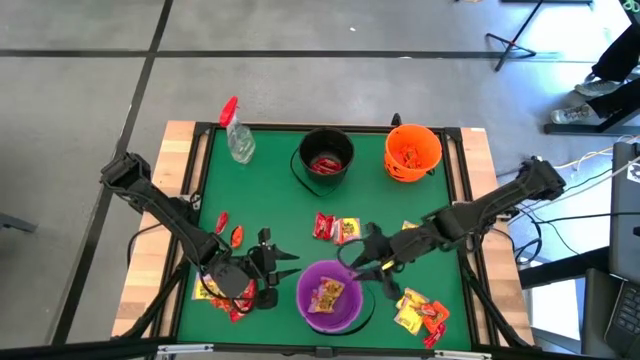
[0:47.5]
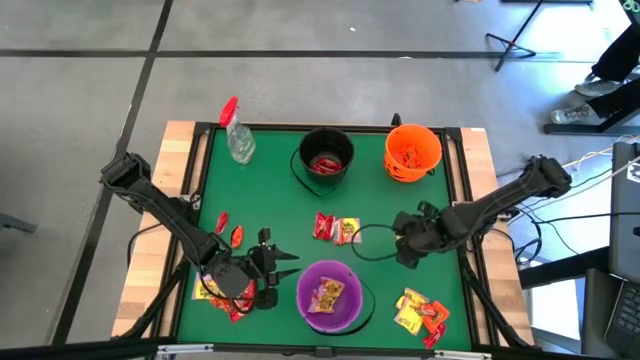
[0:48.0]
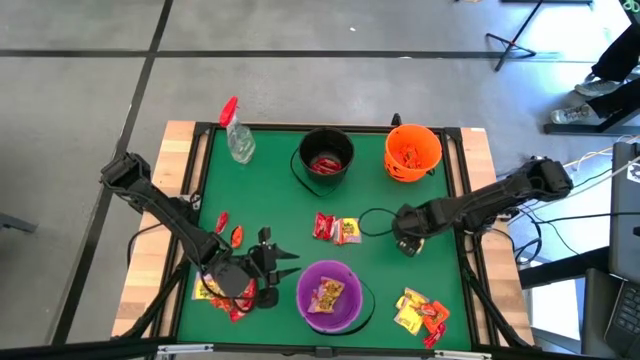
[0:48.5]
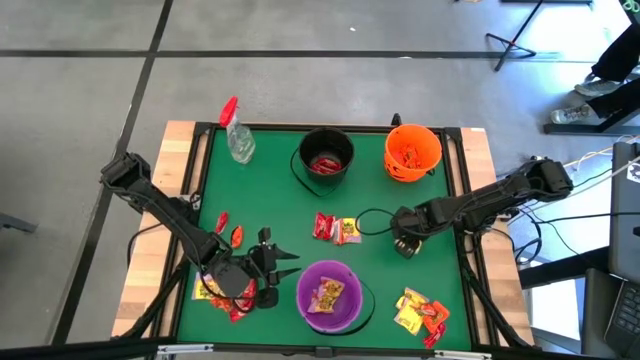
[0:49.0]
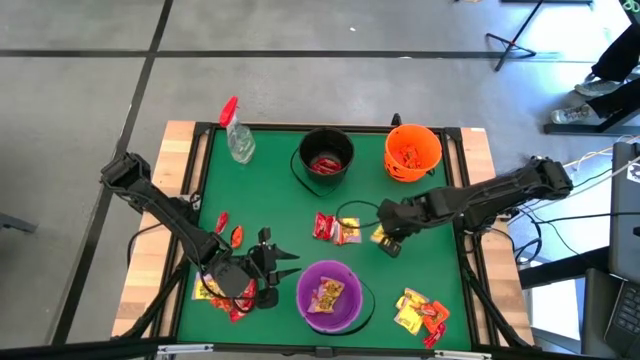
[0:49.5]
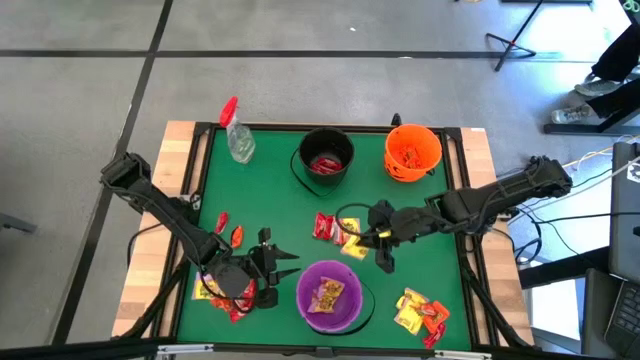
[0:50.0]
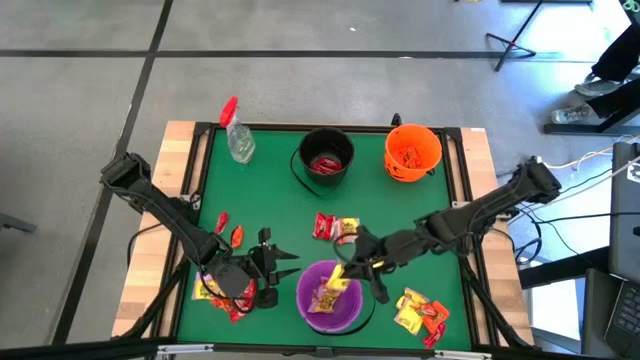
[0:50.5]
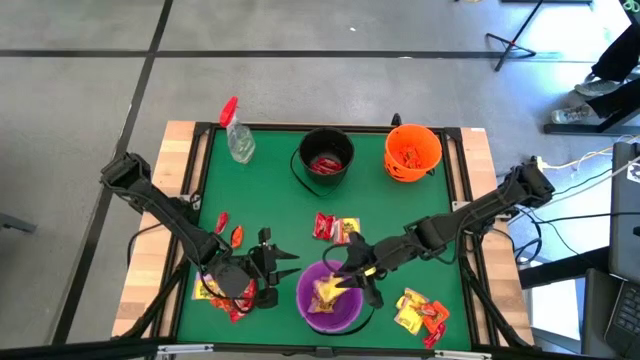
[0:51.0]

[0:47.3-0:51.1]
Task: Organize candy in baskets
Put the yellow candy pack into the purple bucket

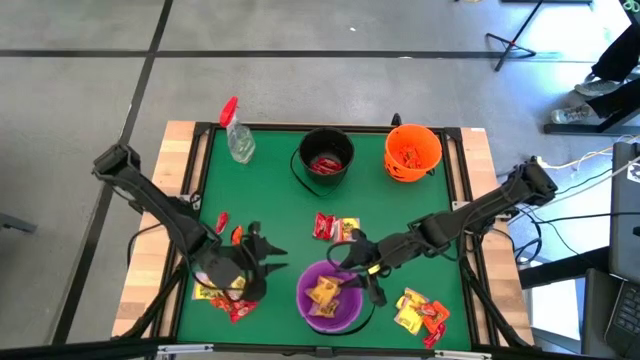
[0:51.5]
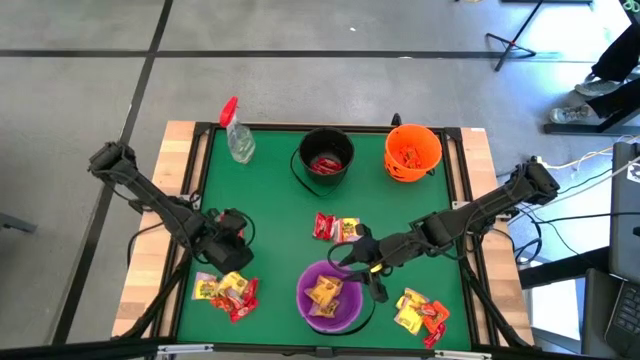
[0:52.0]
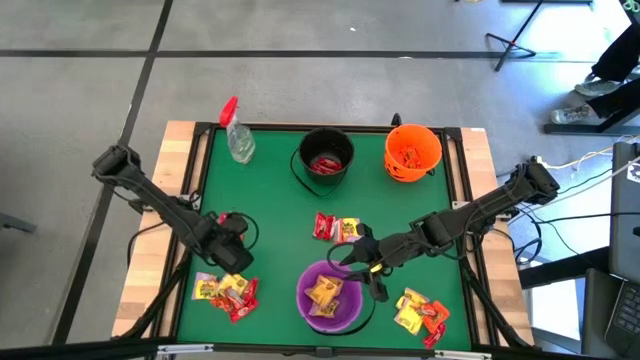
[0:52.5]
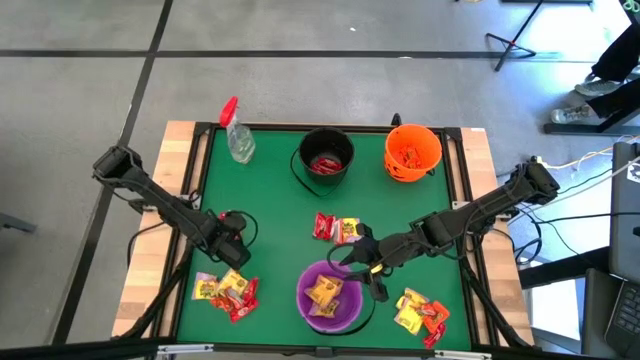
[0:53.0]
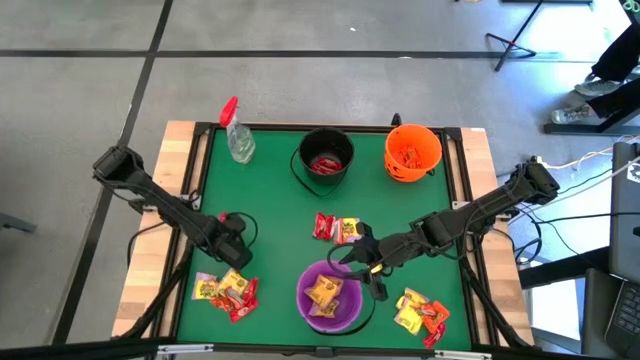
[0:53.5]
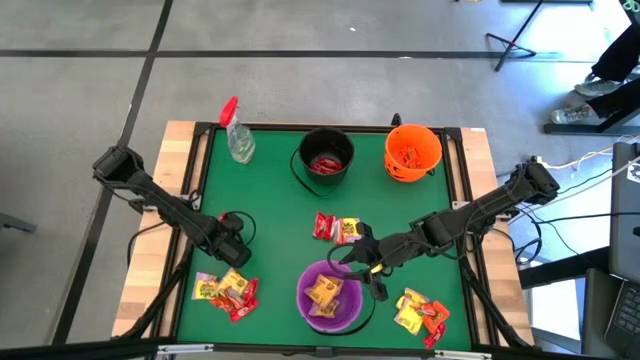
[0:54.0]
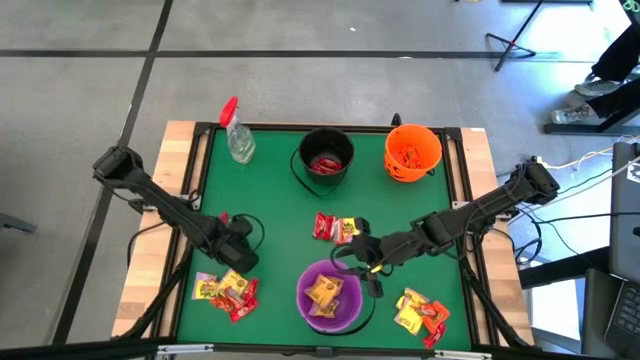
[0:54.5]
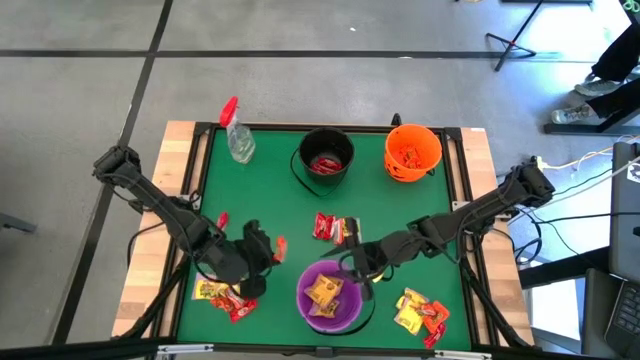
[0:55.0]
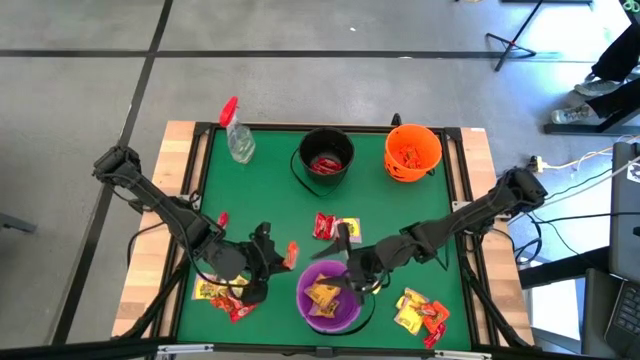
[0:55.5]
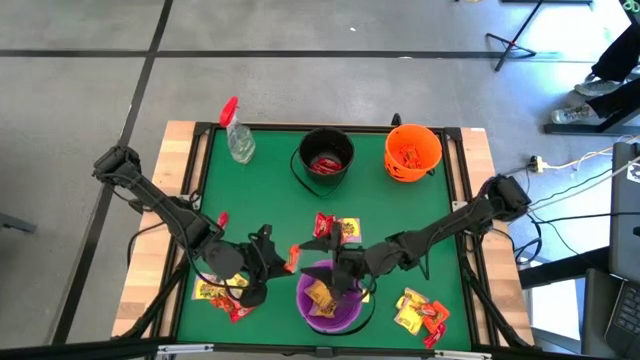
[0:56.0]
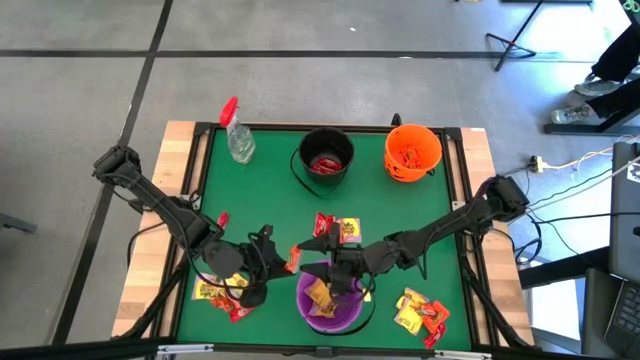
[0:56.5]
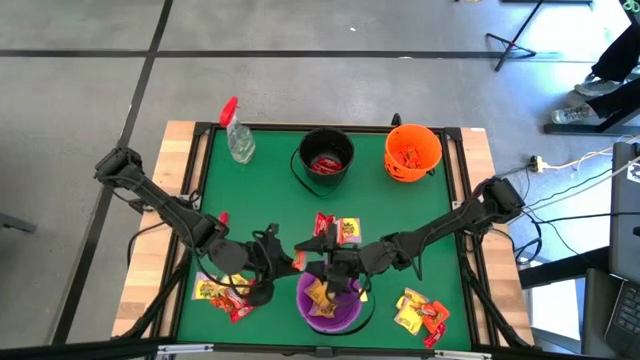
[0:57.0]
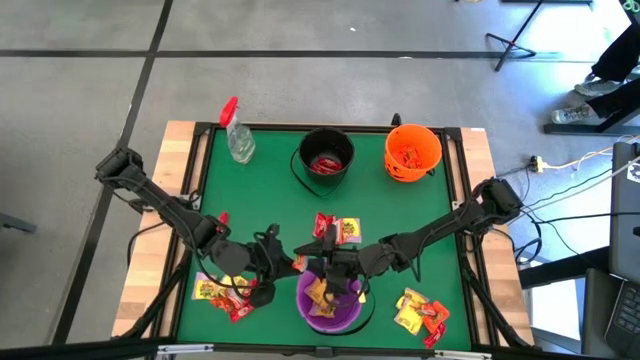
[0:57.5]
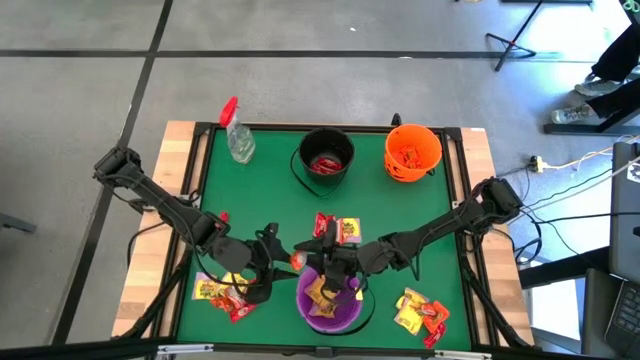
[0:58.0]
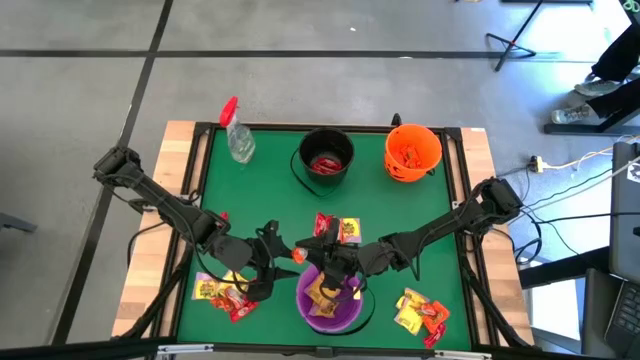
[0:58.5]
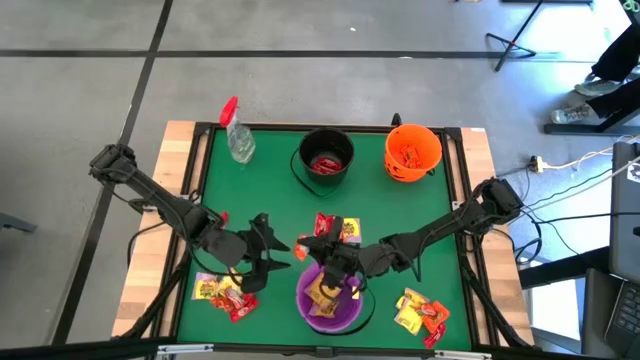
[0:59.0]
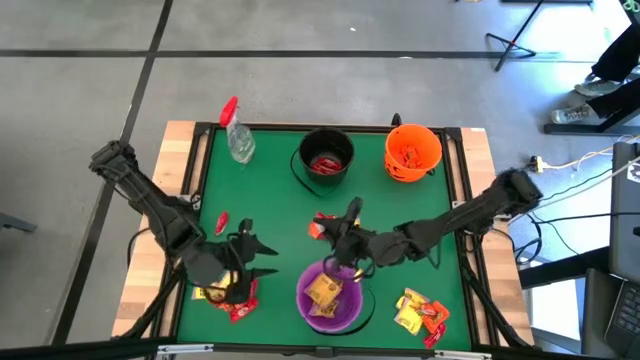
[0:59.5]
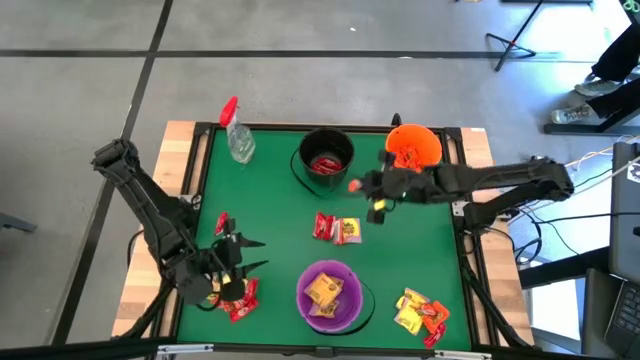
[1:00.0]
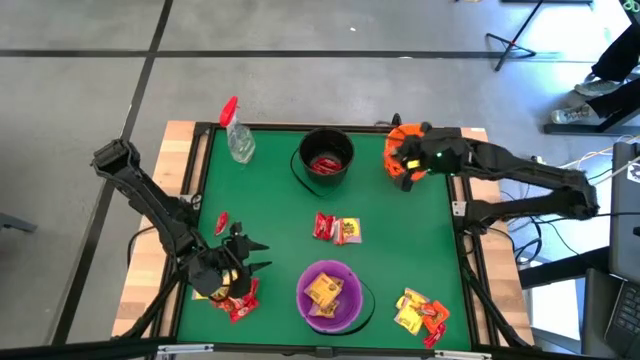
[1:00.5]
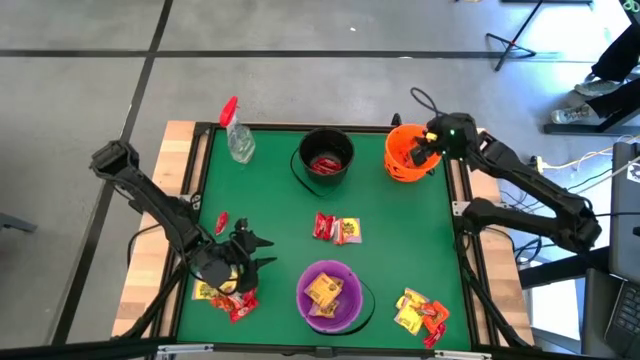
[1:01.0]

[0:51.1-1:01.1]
Put the orange candy pack into the orange bucket

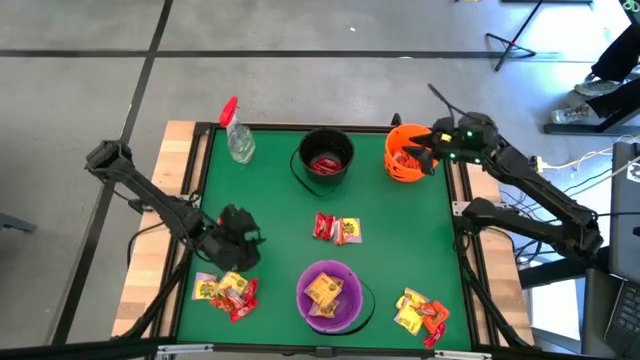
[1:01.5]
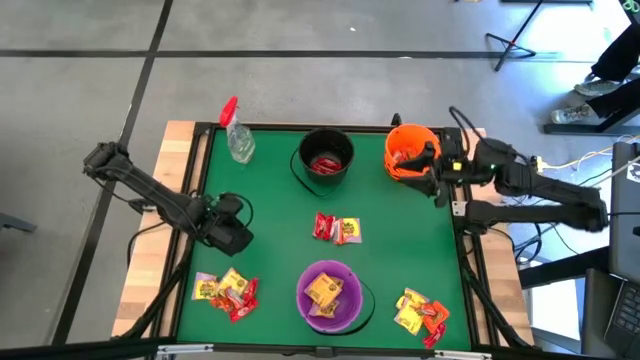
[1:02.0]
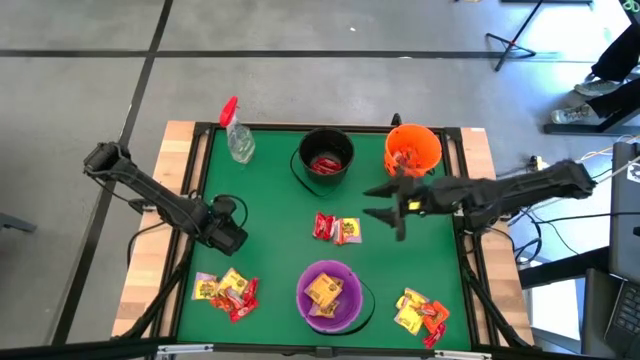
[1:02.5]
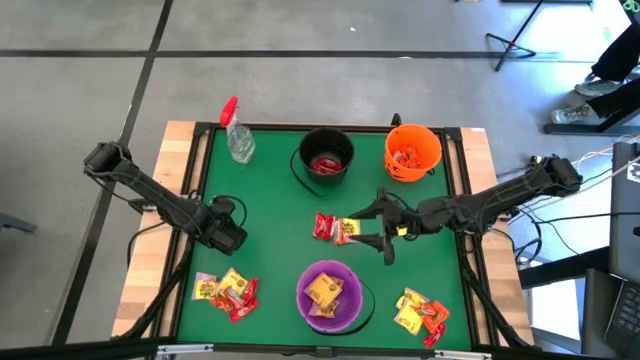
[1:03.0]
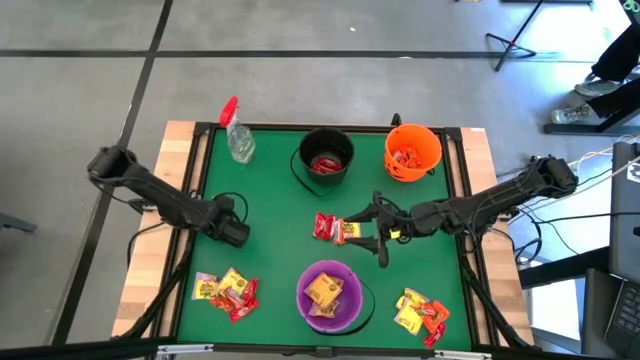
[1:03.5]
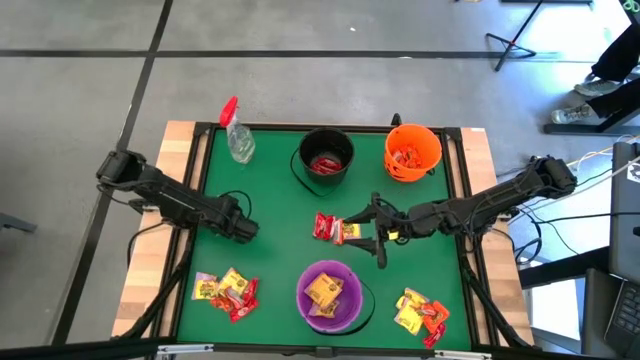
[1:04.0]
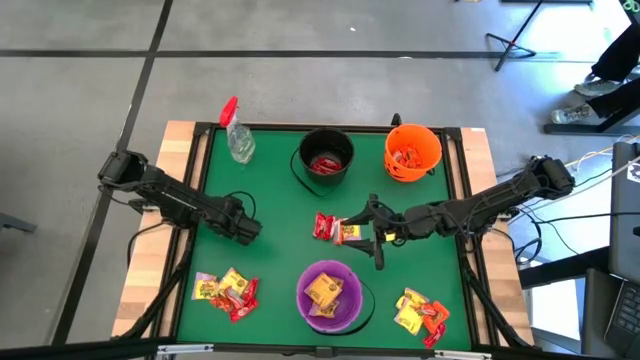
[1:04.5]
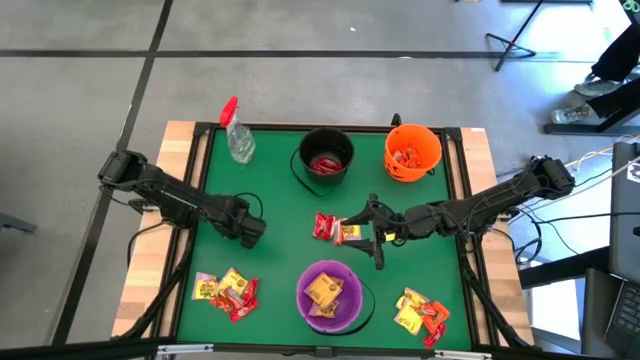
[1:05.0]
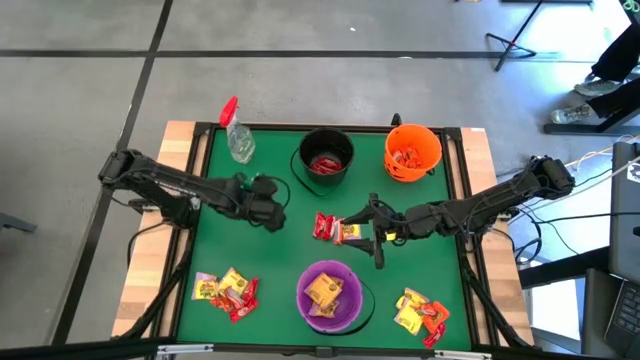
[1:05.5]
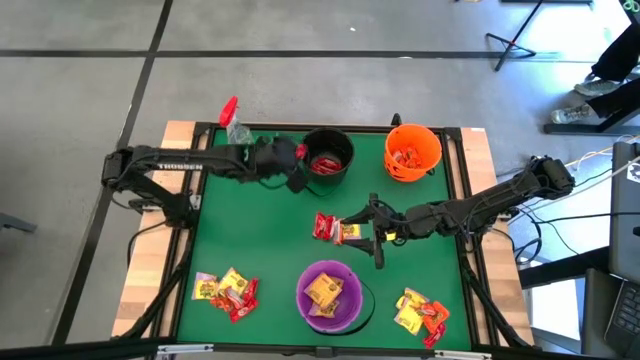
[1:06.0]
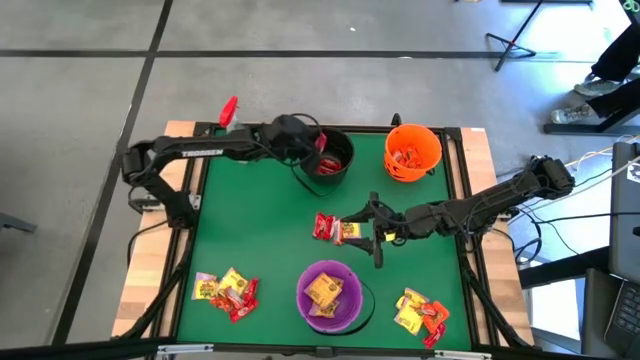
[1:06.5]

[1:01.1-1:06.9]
Put the red candy pack into the black bucket

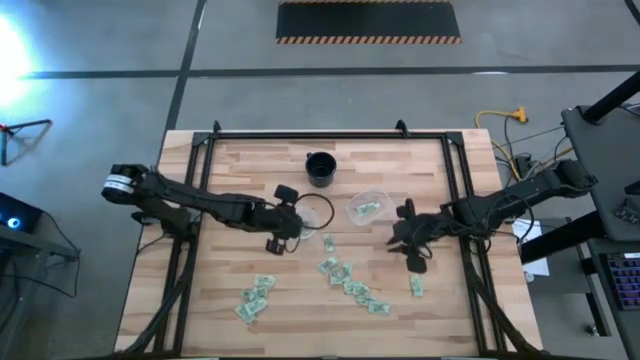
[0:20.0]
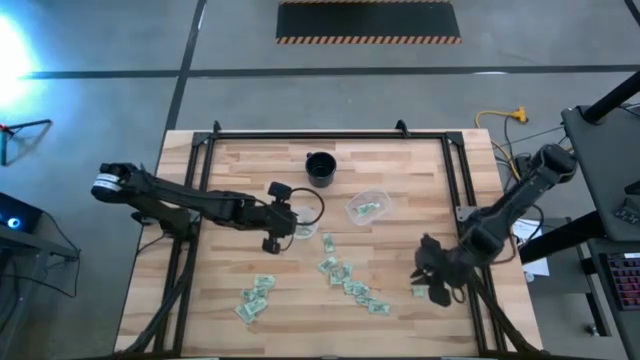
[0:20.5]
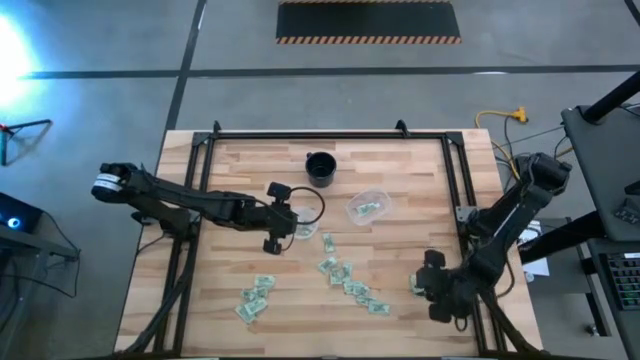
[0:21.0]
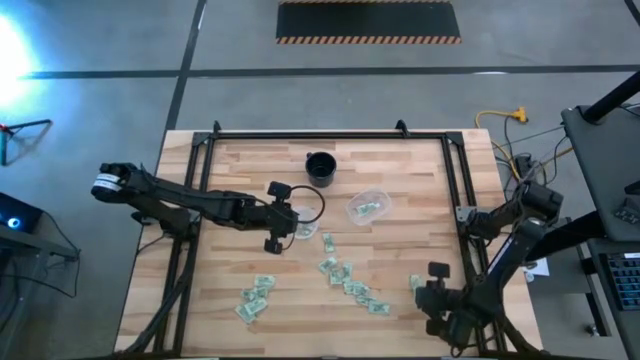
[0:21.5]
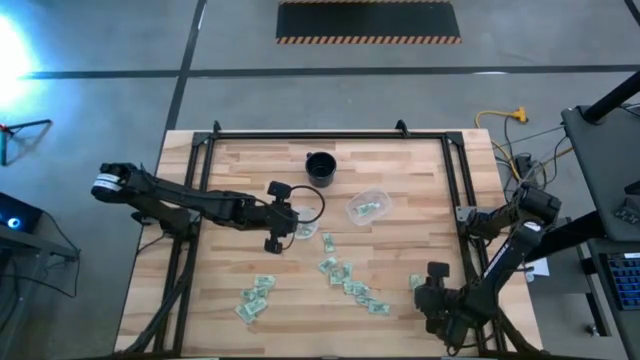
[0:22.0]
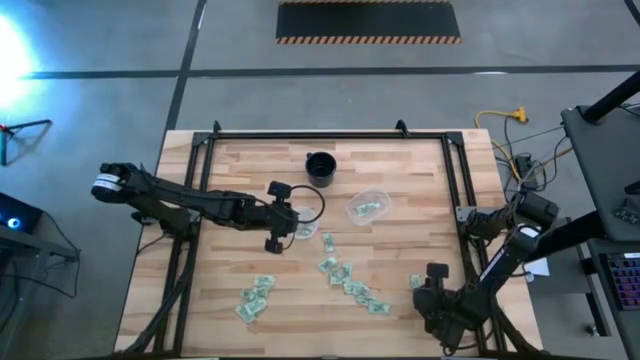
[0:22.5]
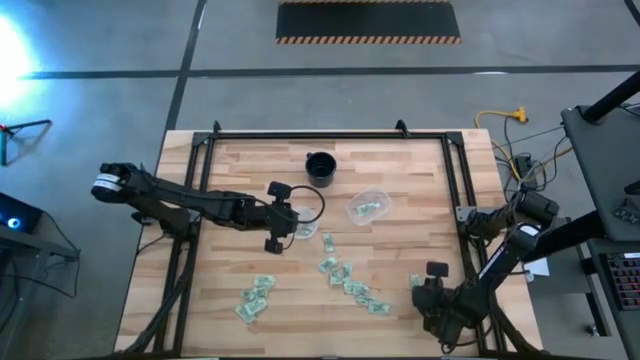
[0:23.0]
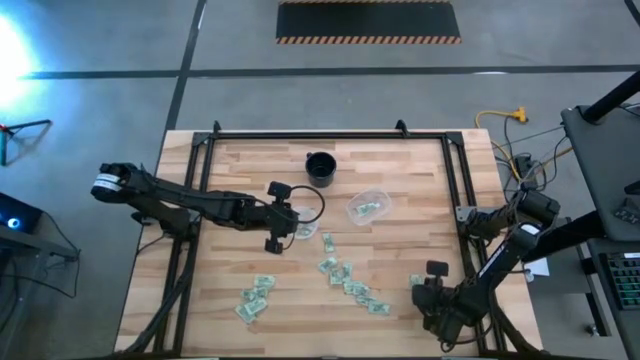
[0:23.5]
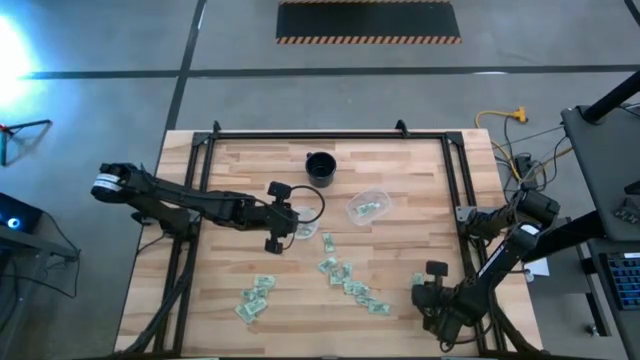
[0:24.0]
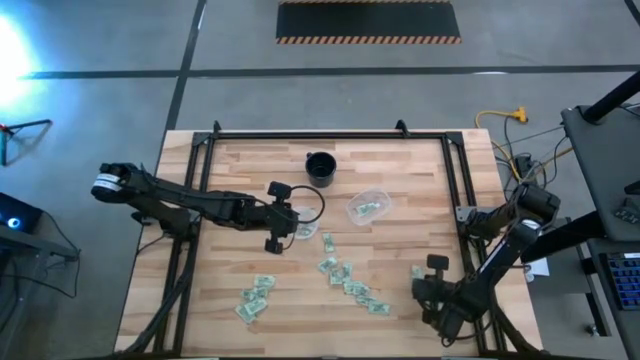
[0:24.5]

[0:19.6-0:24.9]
Task: Pick and place Stevia / Truvia into bins
Put the green stevia packet into the right transparent container
